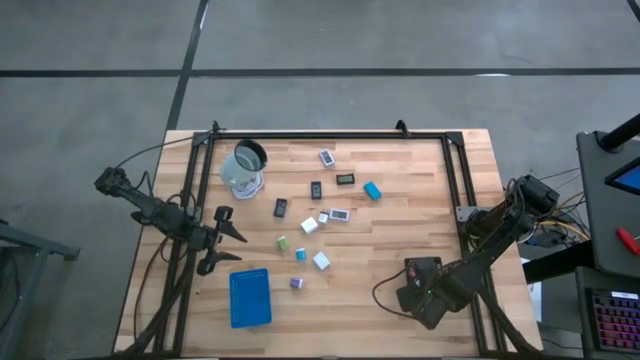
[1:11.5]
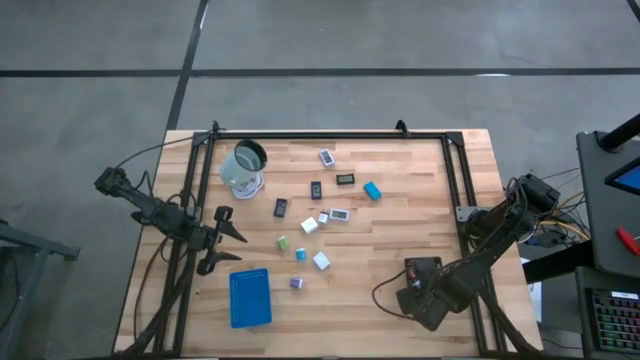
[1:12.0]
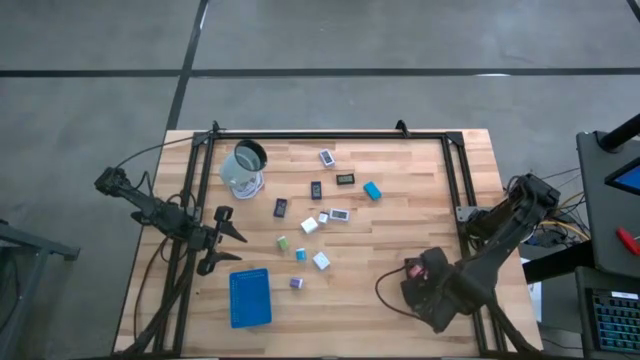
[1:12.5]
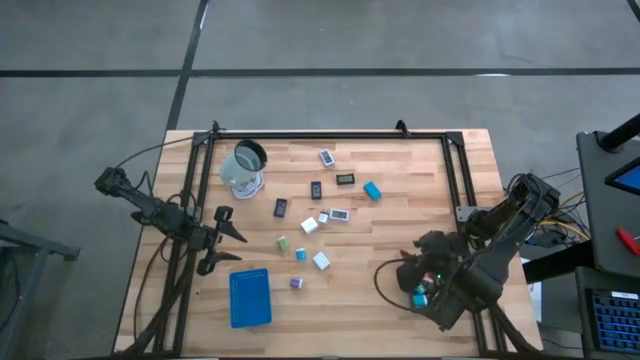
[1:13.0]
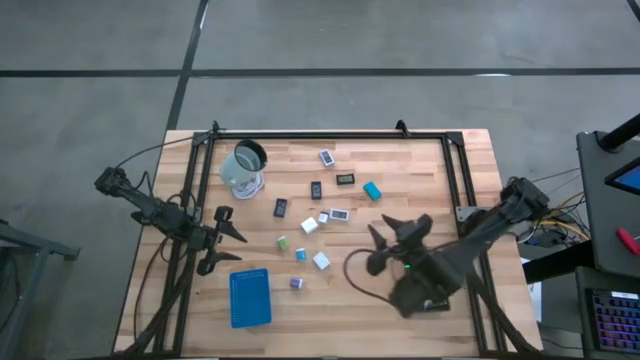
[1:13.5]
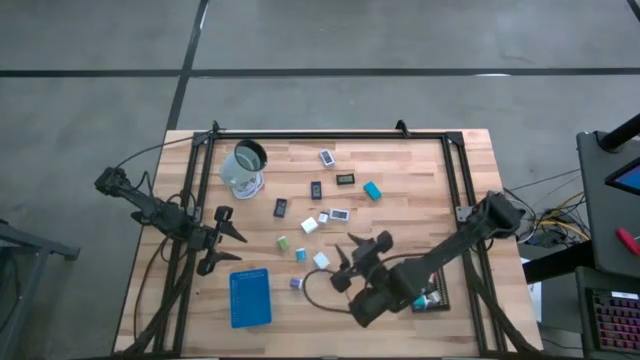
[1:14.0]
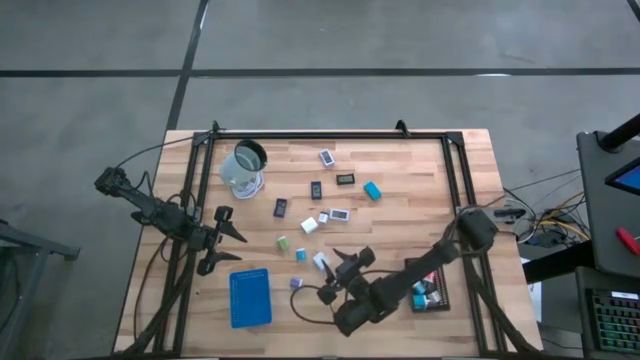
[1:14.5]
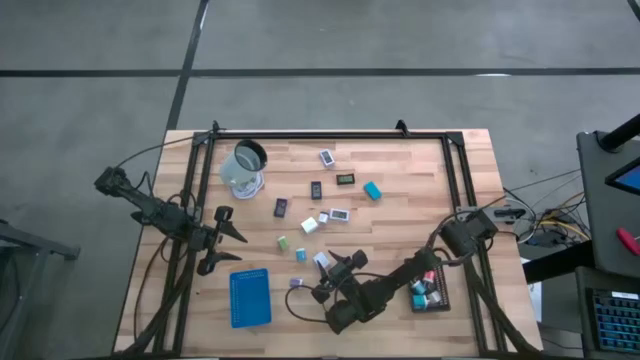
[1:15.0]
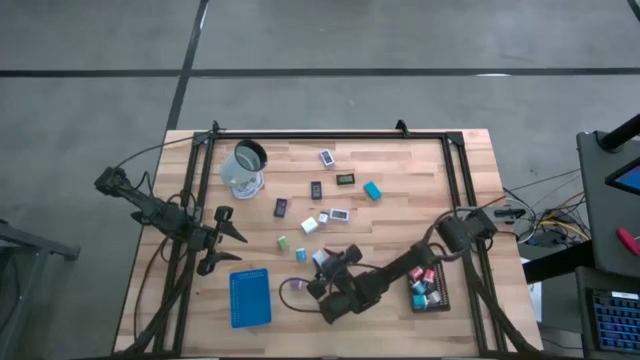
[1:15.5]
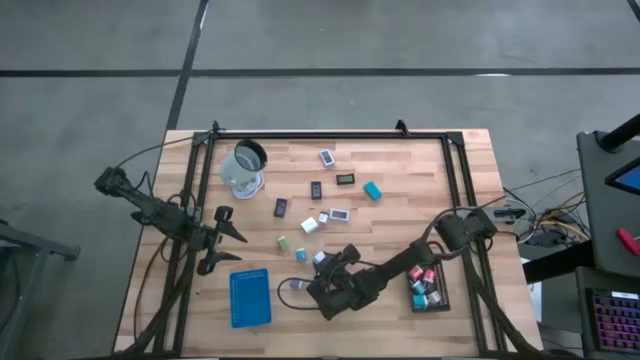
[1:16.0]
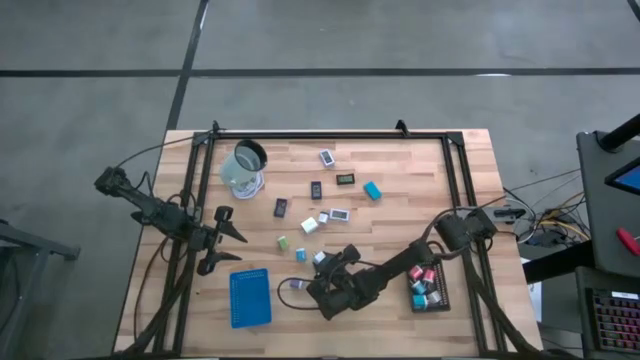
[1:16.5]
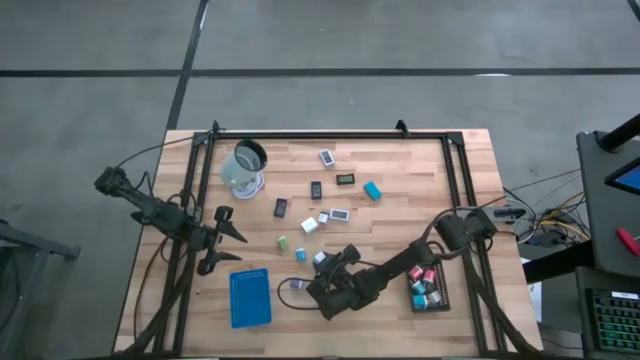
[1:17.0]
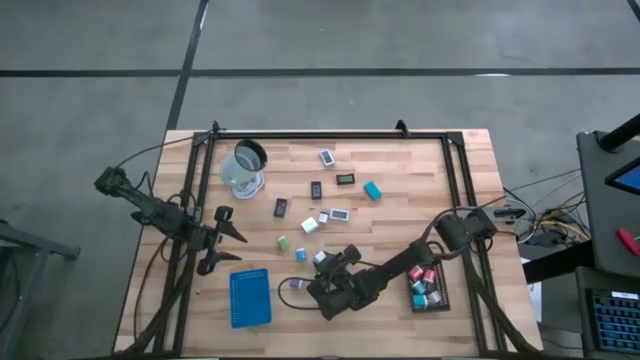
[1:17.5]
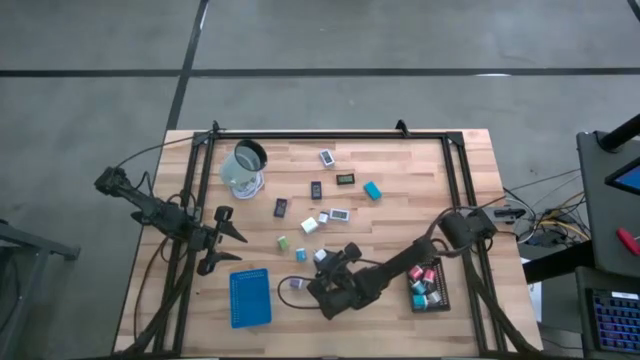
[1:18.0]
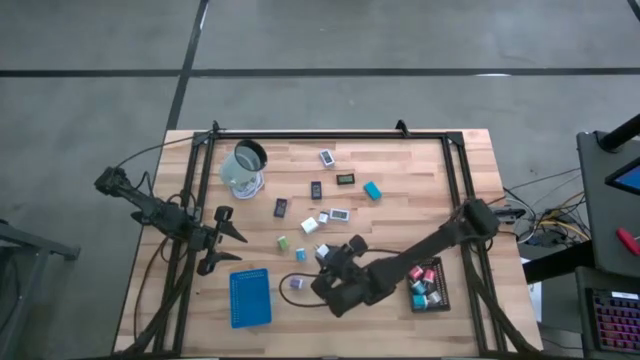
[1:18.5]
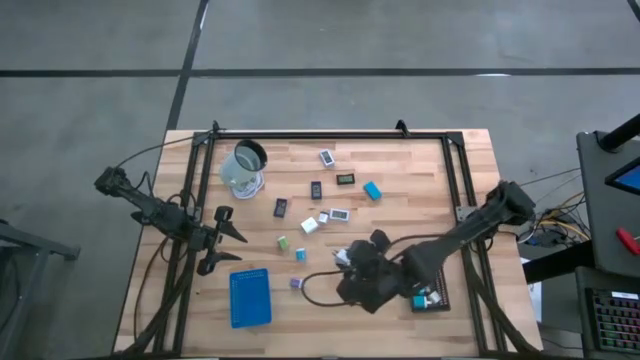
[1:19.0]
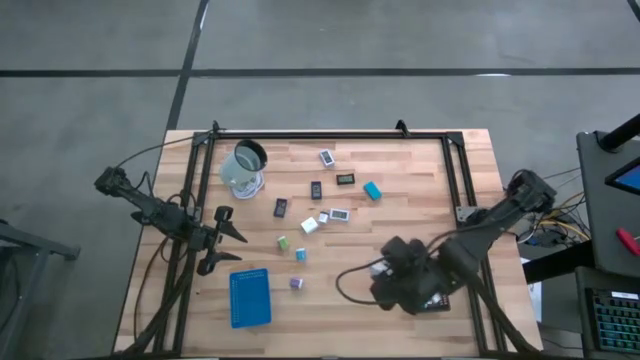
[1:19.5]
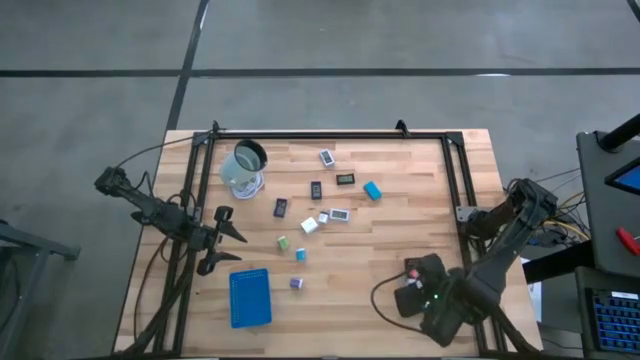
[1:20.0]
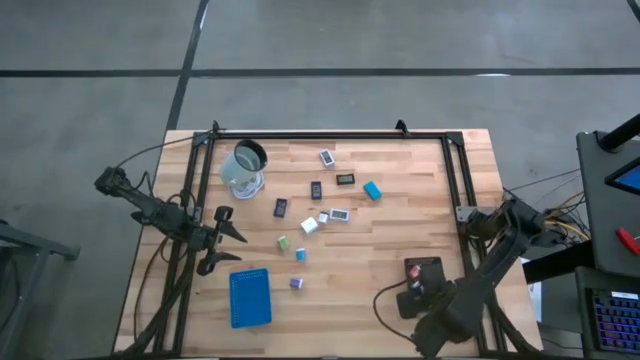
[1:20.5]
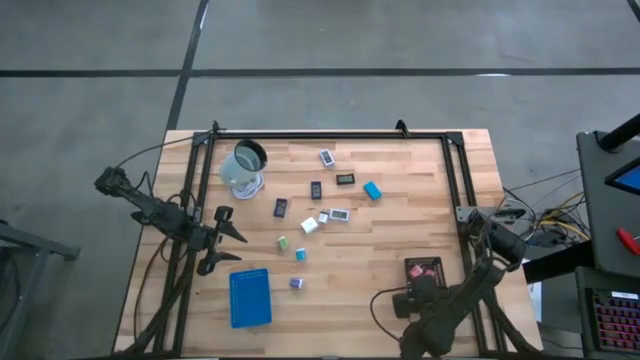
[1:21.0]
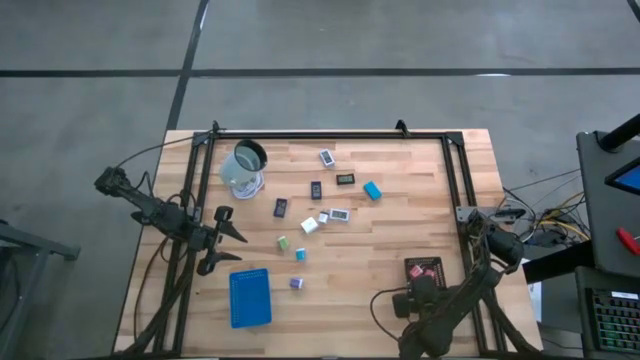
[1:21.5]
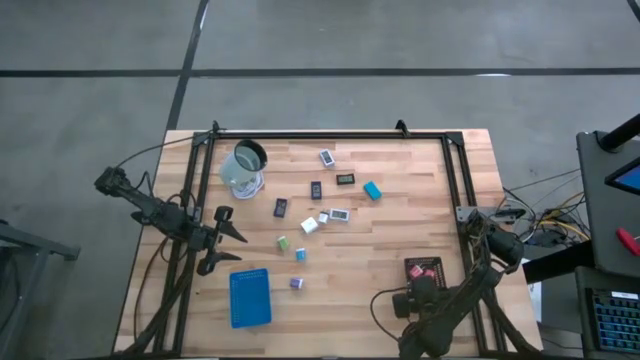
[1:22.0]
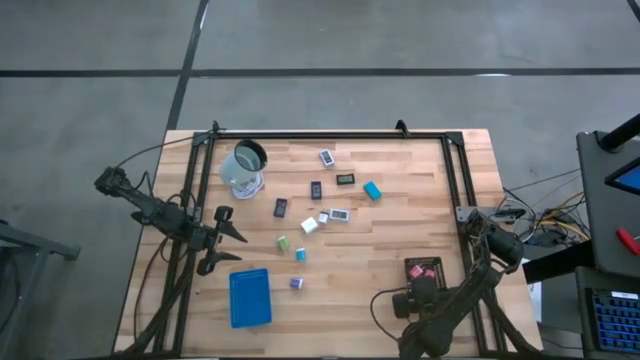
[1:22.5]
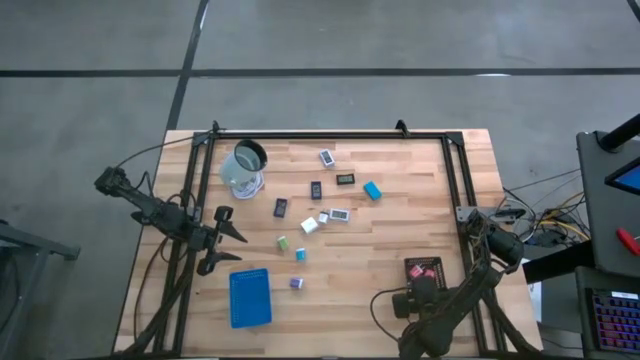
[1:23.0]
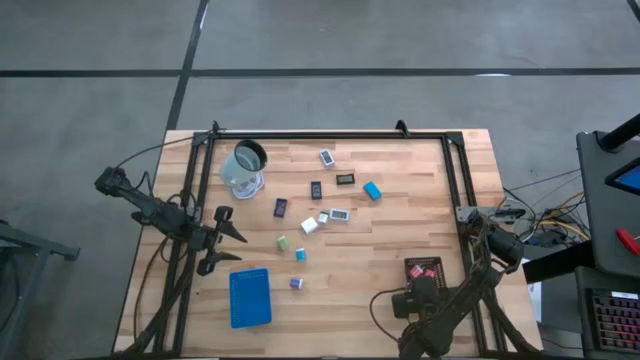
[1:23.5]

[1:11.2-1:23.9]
Task: Pick & Place Office items
Put the bottom white charger adapter into the black bin

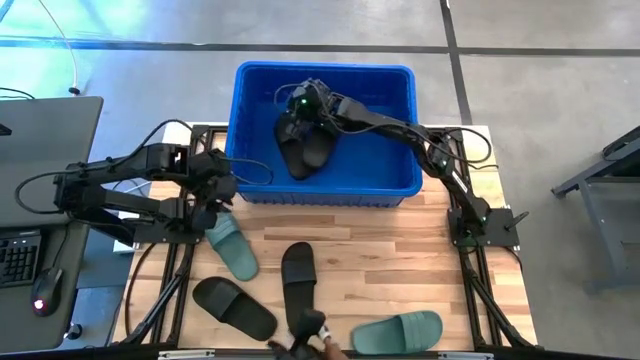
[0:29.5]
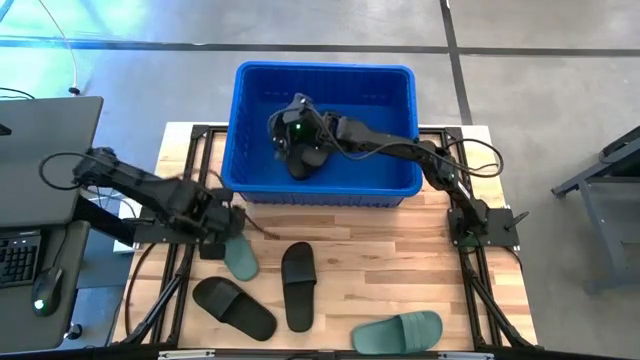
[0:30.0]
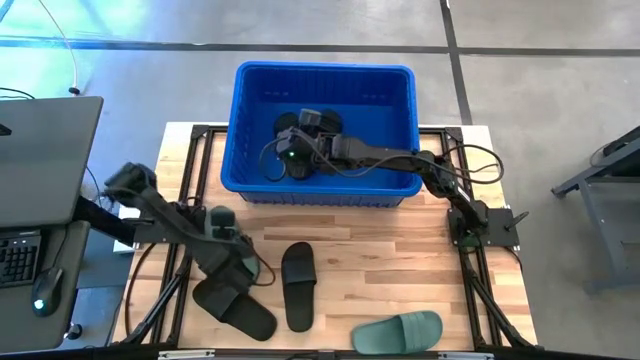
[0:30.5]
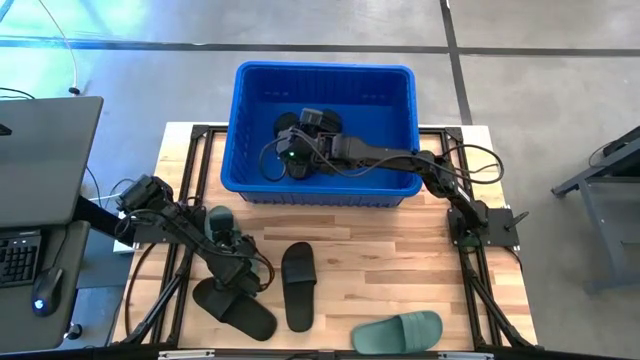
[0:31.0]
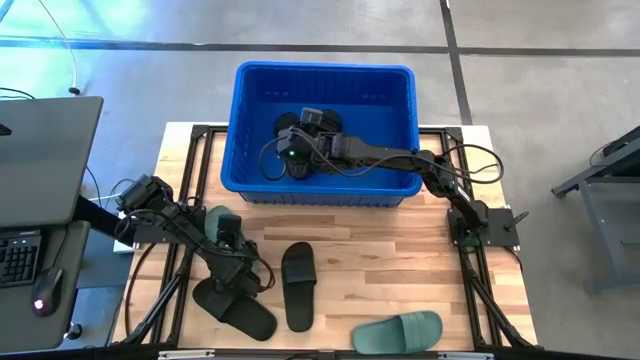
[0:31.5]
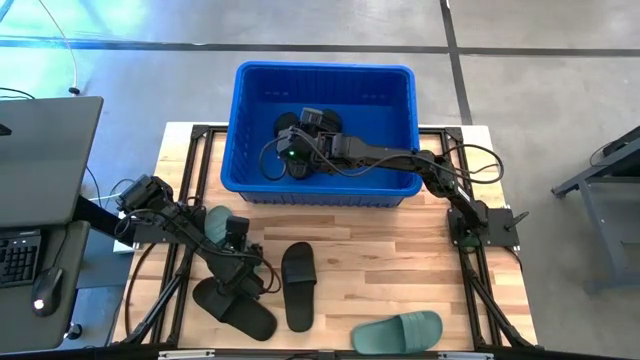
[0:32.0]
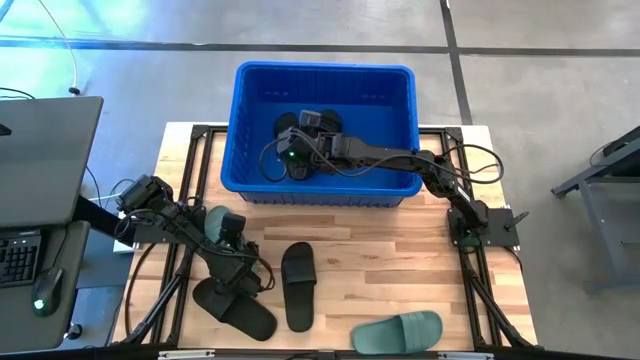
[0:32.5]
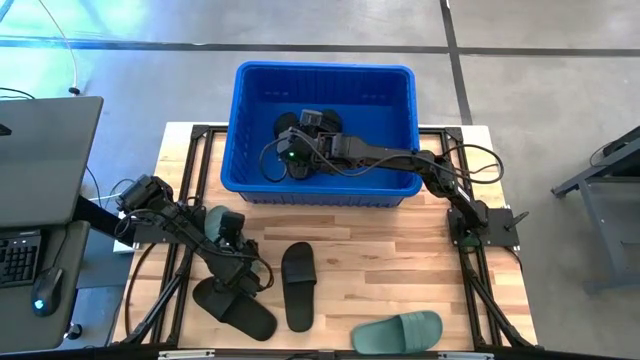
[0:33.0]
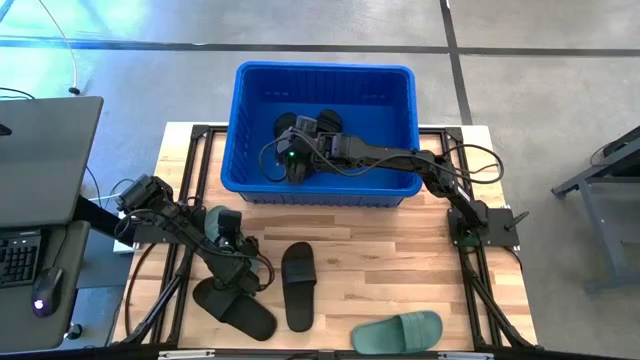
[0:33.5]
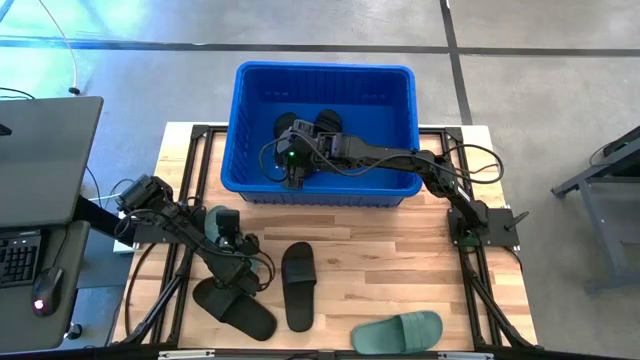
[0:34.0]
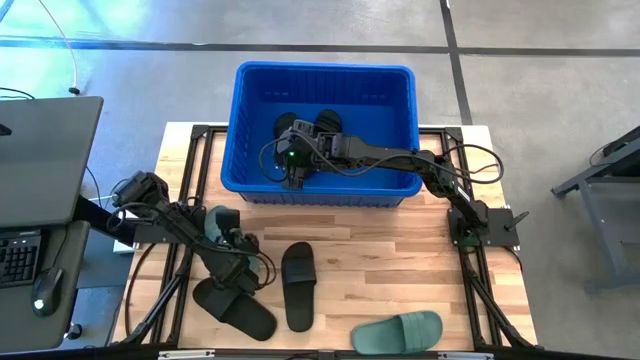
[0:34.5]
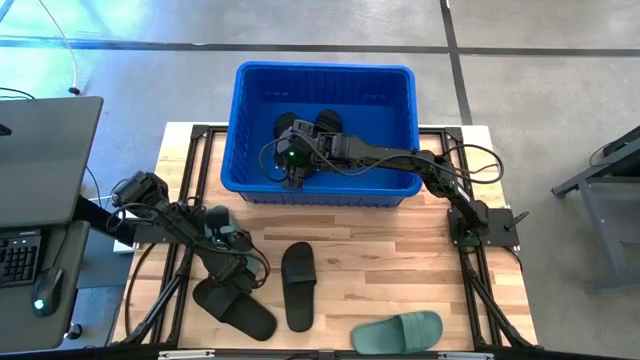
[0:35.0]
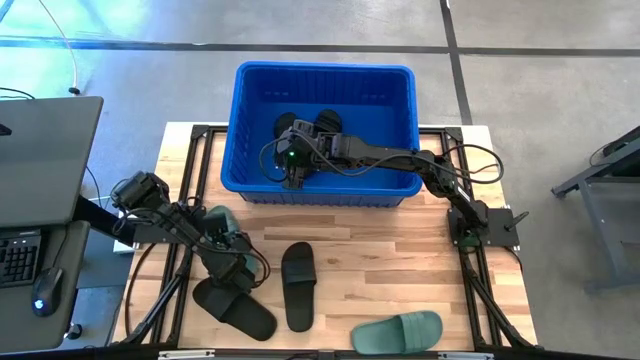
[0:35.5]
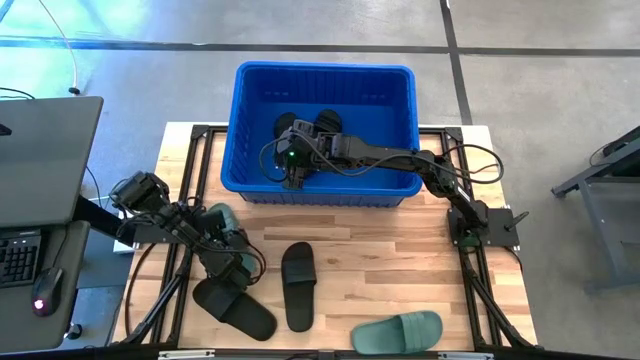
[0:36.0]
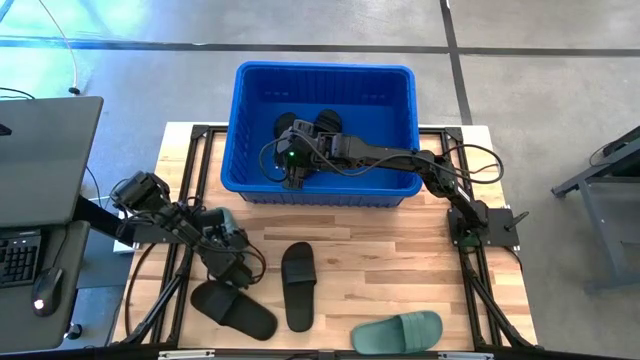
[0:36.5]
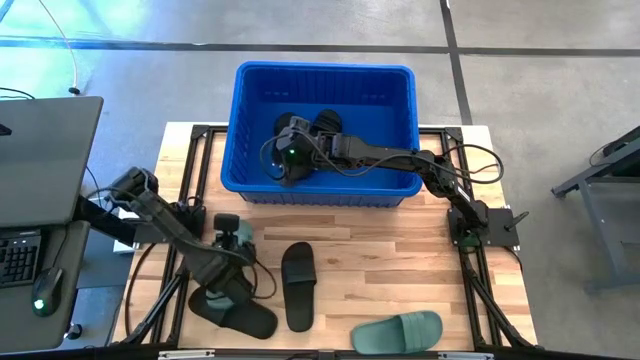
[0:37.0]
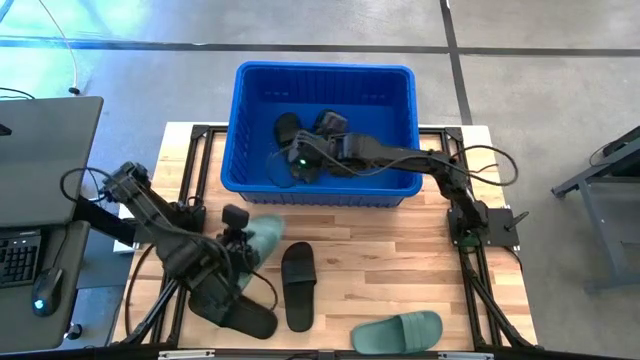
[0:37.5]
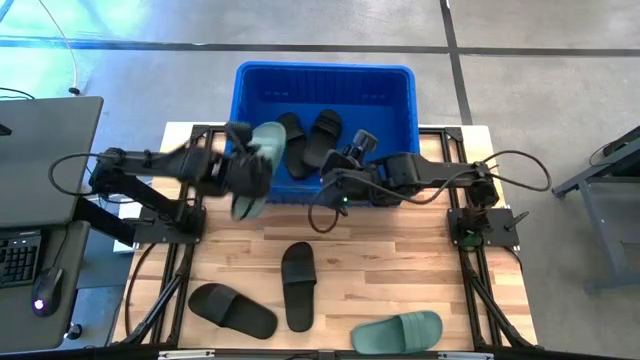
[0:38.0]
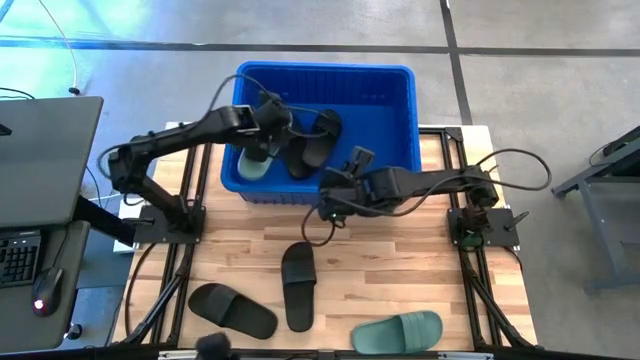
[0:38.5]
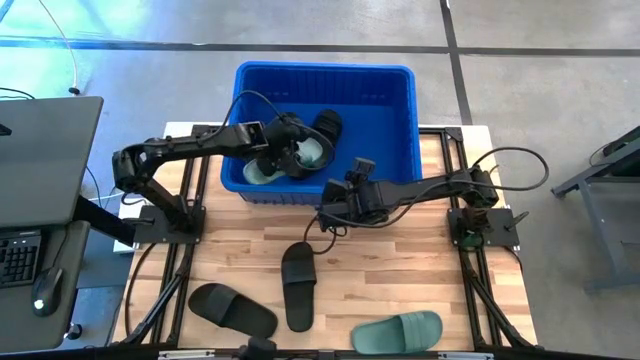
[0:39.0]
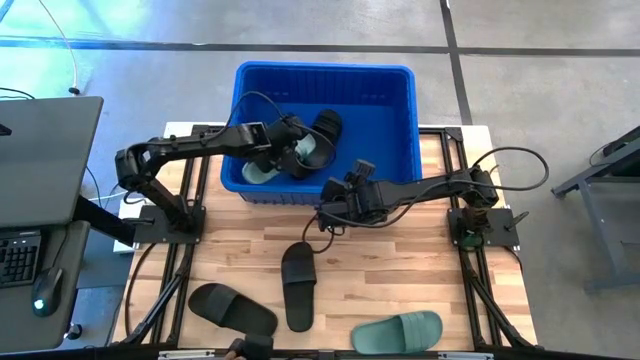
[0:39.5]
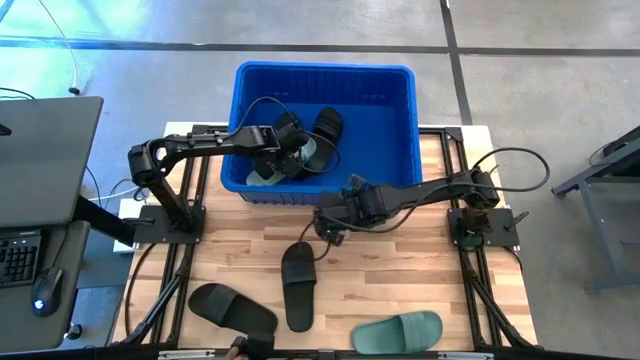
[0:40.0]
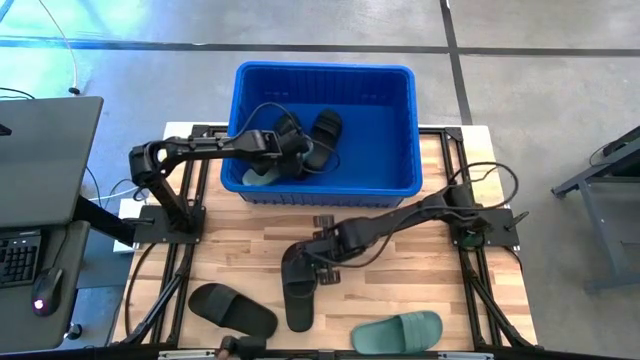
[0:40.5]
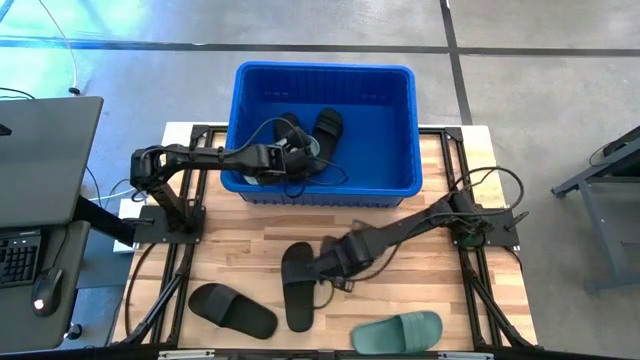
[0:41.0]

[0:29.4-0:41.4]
Task: Pick and place slides into bin
Put the green slide into the blue bin
